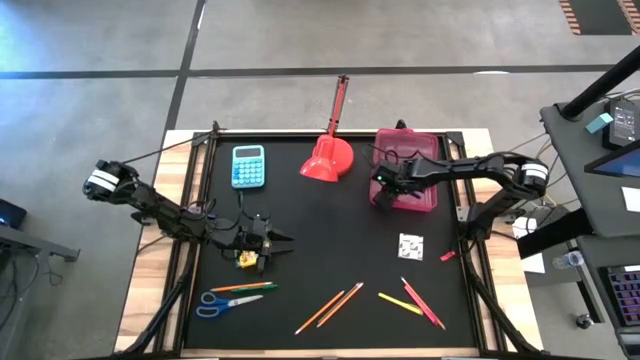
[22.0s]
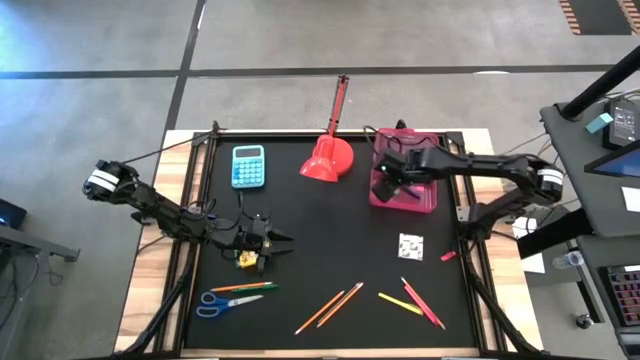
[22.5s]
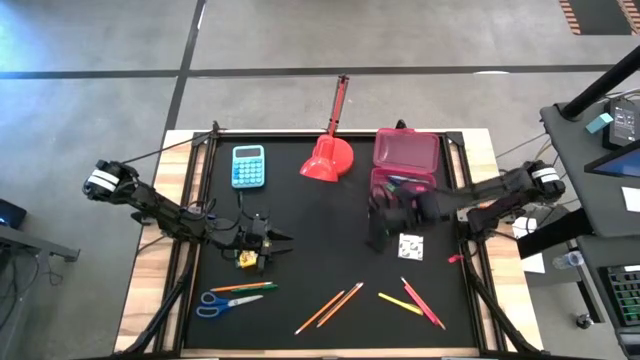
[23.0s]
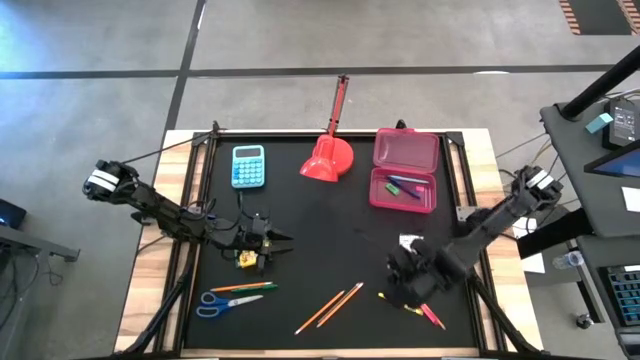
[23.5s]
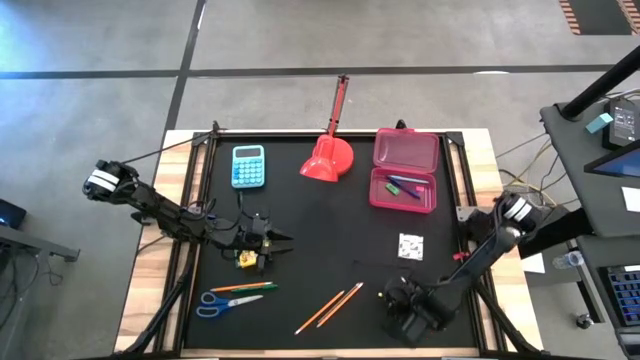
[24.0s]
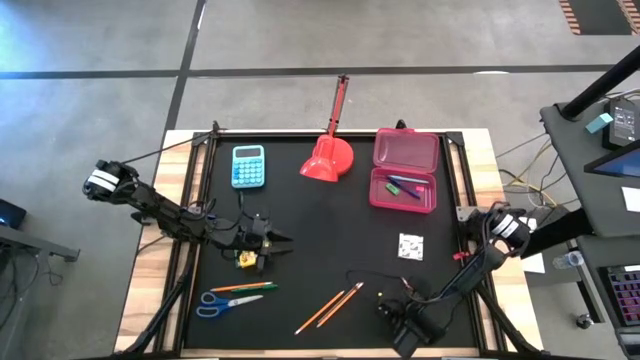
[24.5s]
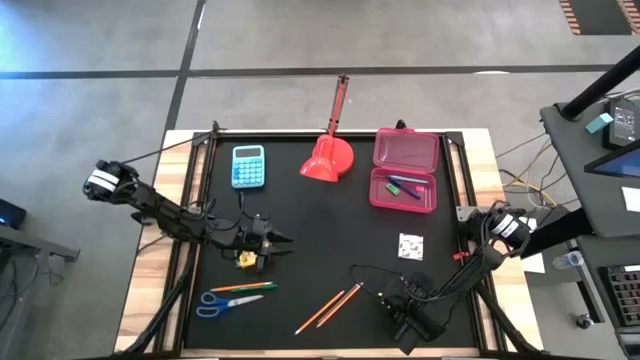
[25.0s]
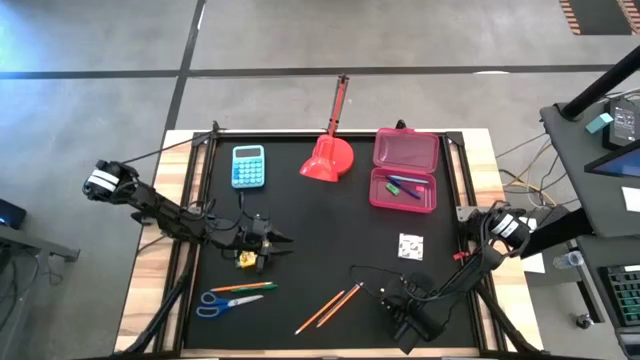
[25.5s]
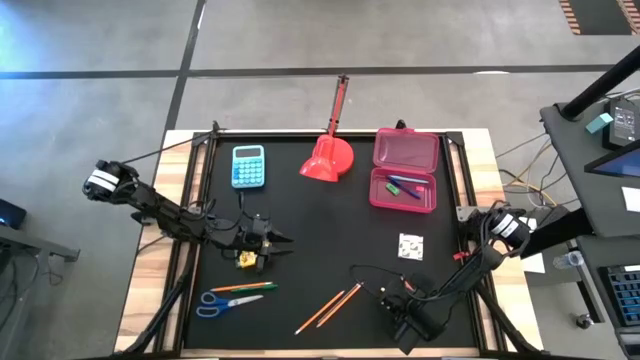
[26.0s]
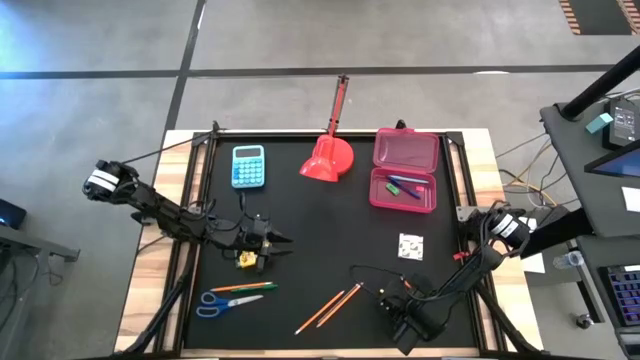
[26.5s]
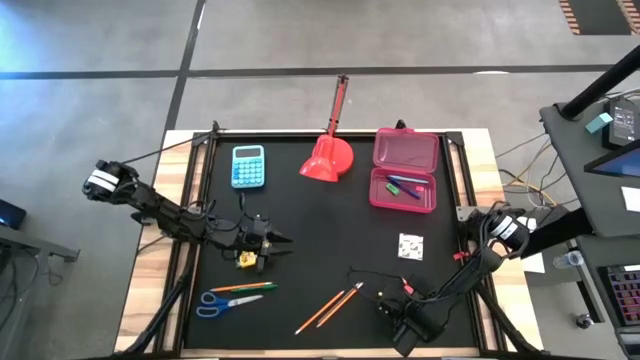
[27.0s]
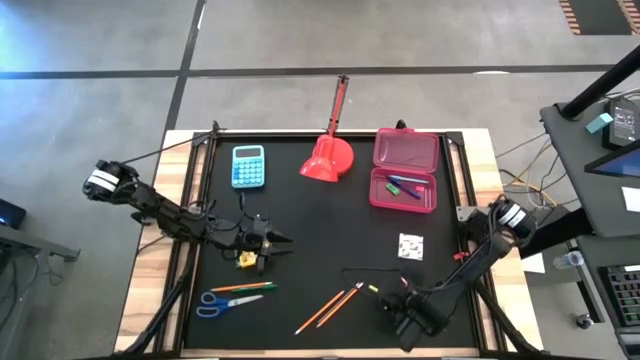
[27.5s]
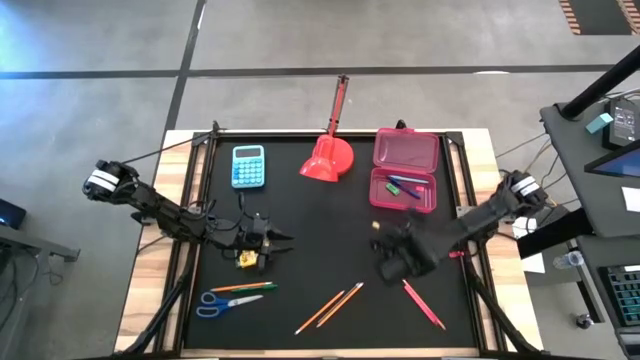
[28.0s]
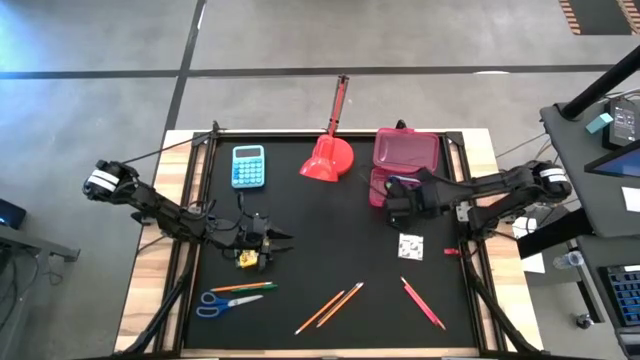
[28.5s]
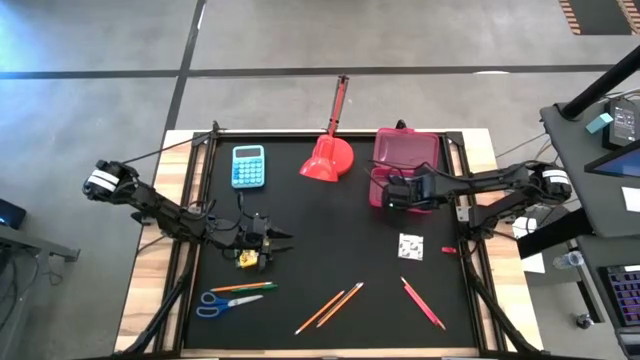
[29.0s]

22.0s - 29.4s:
Task: Pack school essentials
Put the yellow pen into the pink supply box

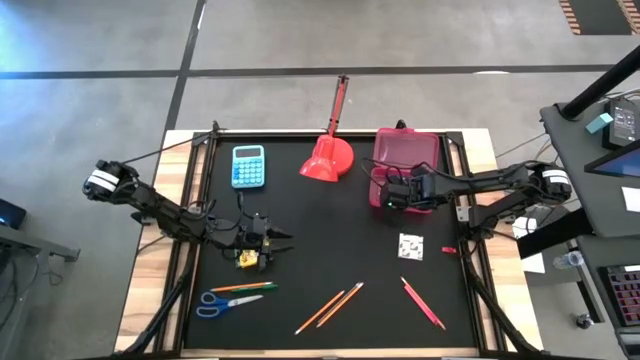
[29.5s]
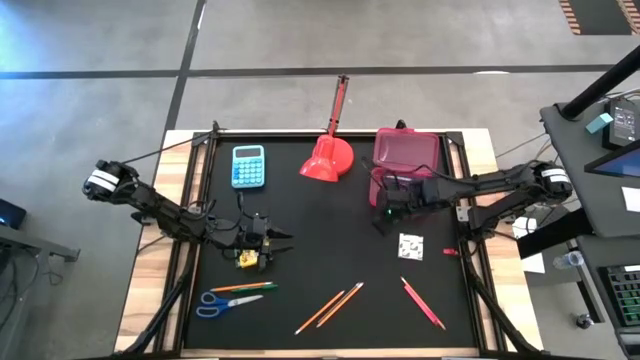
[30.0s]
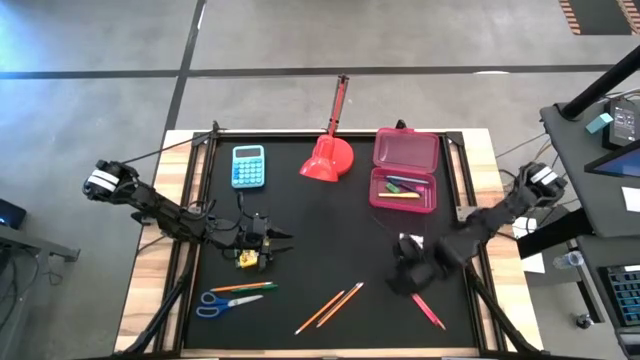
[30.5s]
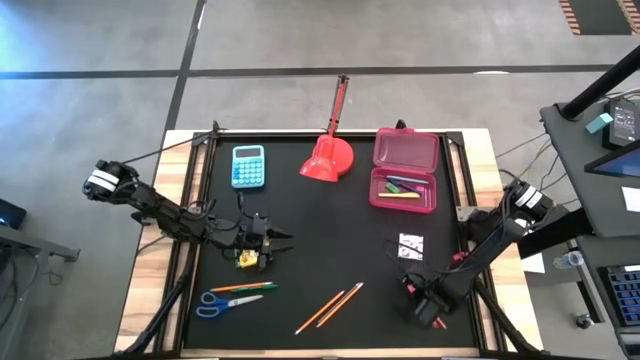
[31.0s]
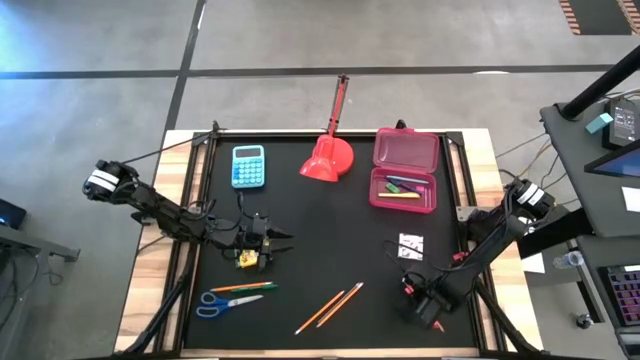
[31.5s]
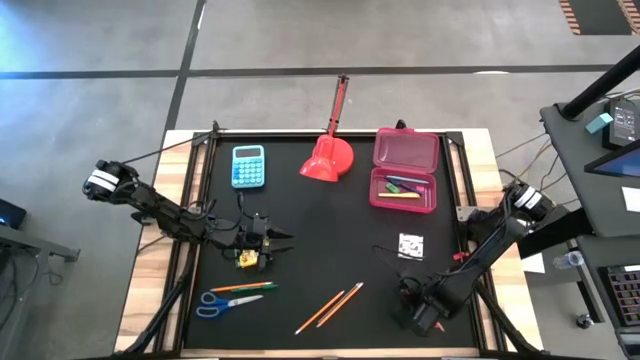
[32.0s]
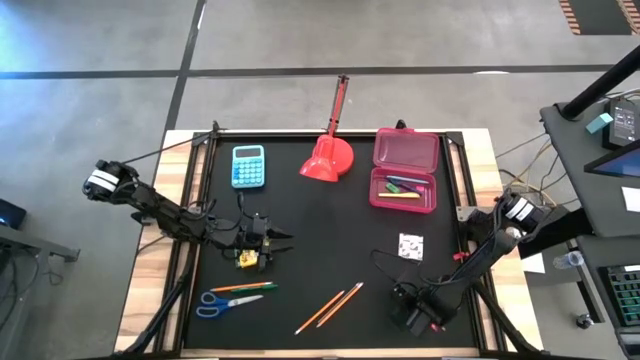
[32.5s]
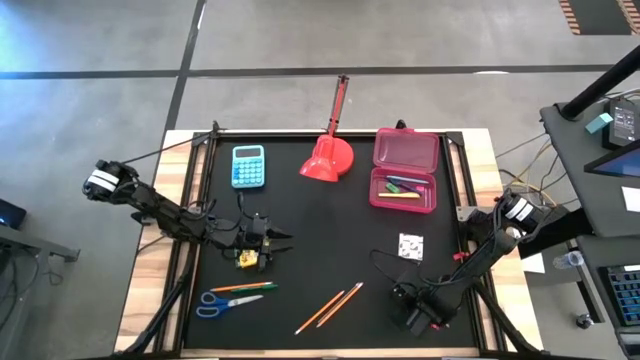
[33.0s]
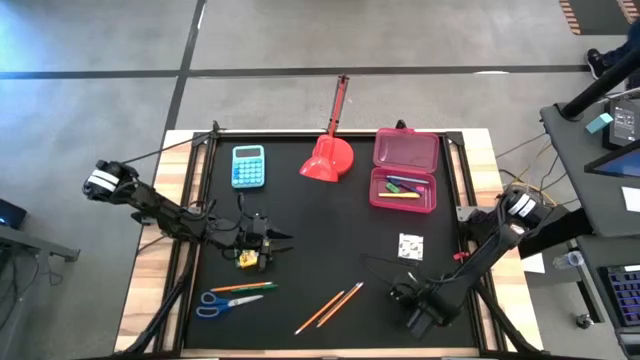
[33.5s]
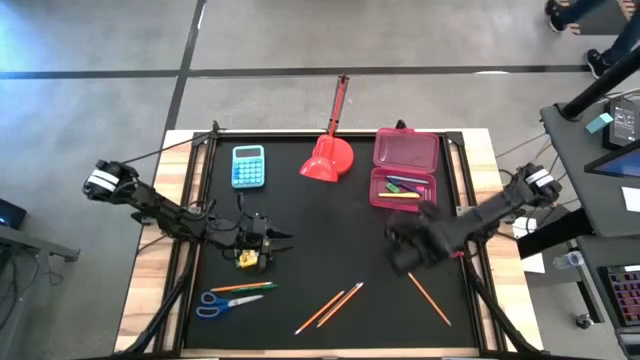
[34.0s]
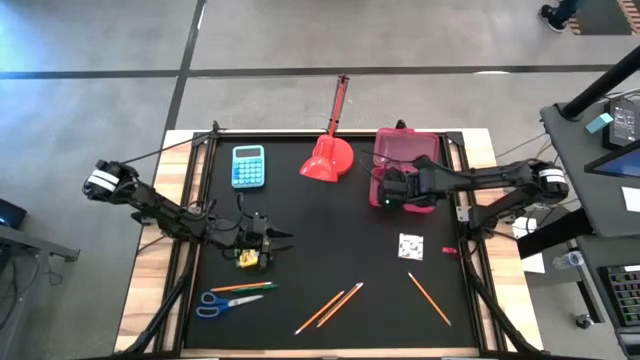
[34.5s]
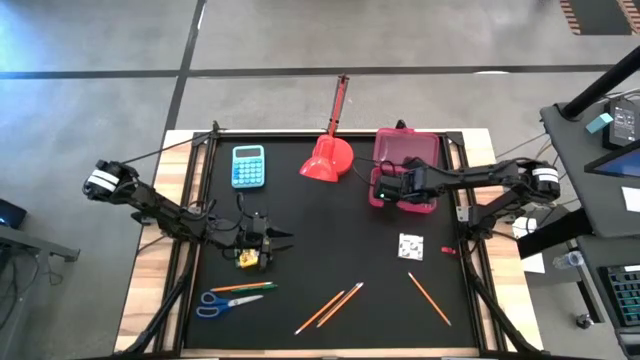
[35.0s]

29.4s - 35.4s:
Put the pink pen into the pink supply box

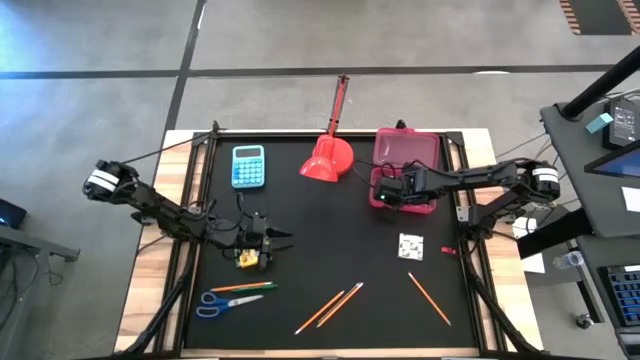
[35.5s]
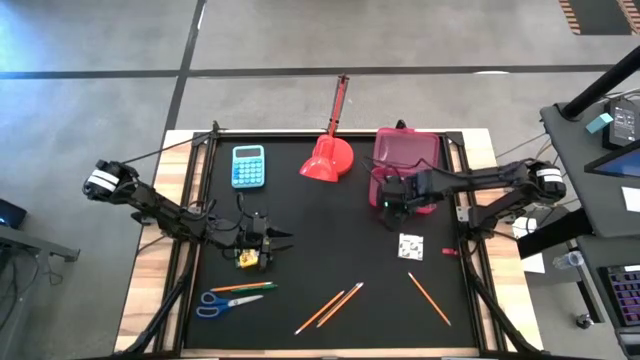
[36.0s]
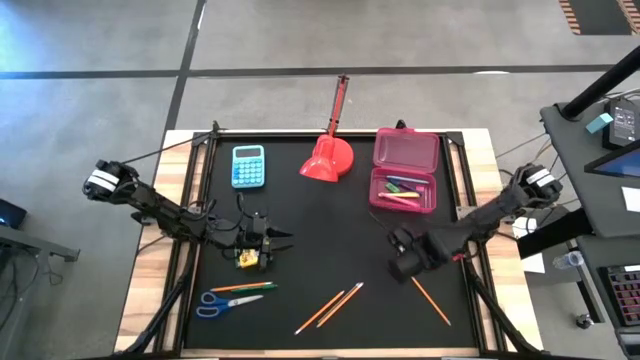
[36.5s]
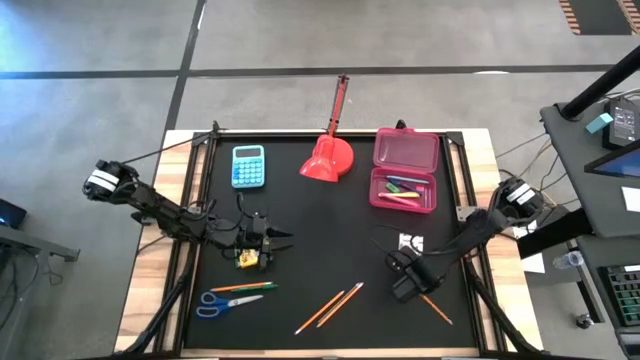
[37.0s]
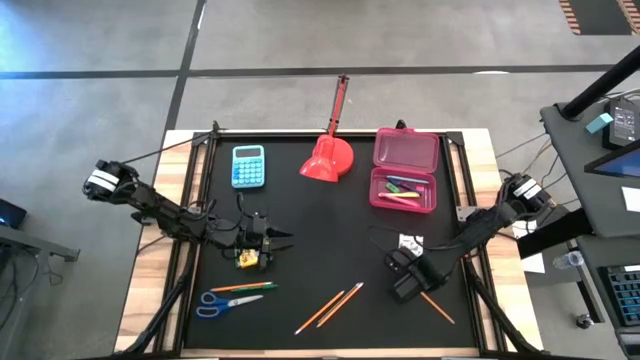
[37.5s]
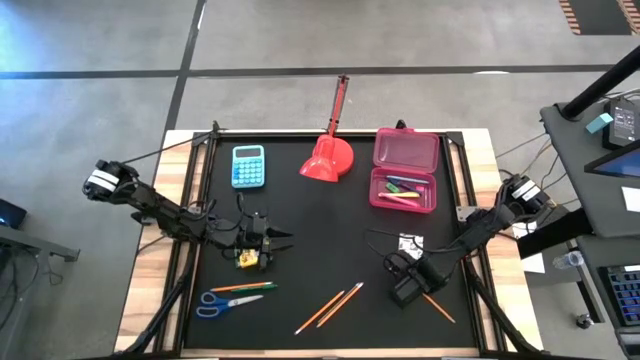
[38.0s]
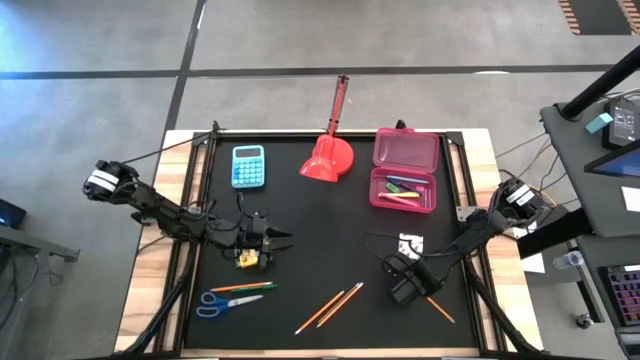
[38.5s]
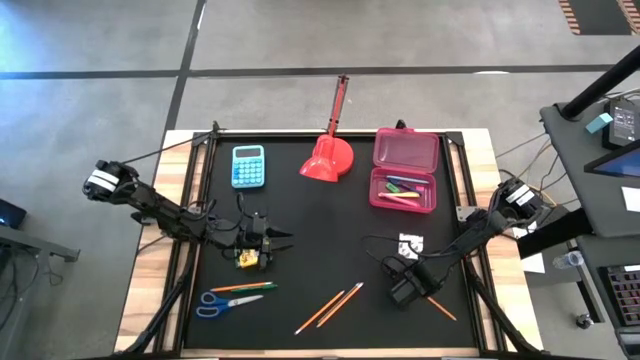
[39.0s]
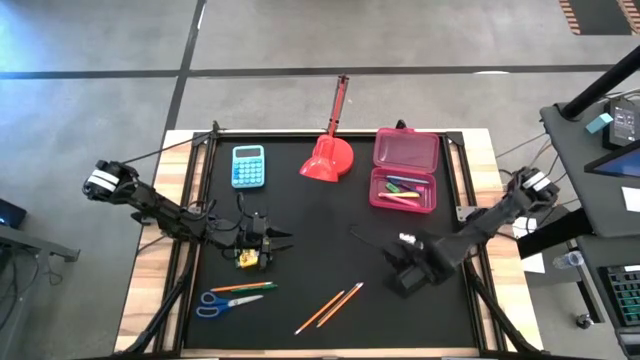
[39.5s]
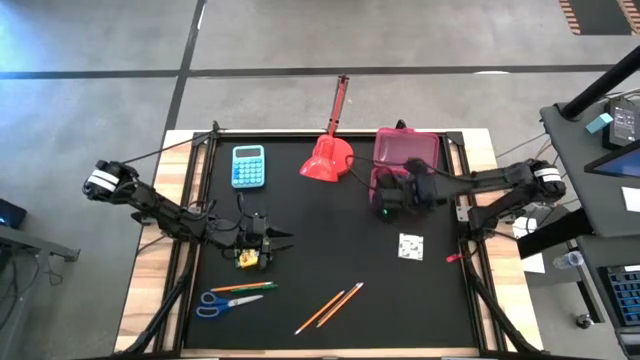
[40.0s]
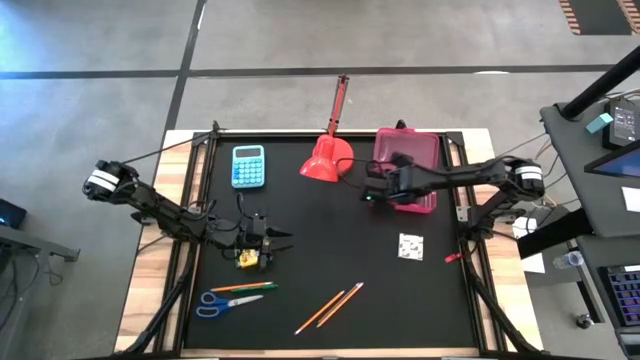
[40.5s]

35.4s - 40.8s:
Put the orange pencil into the pink supply box

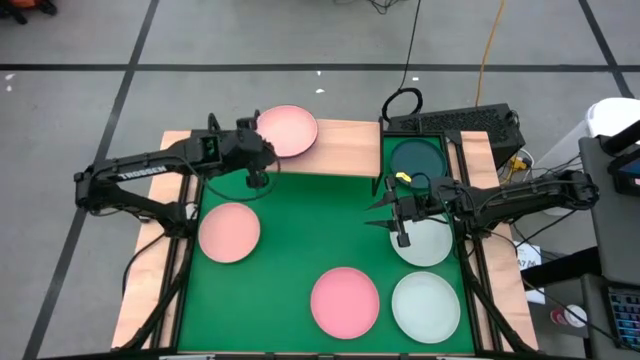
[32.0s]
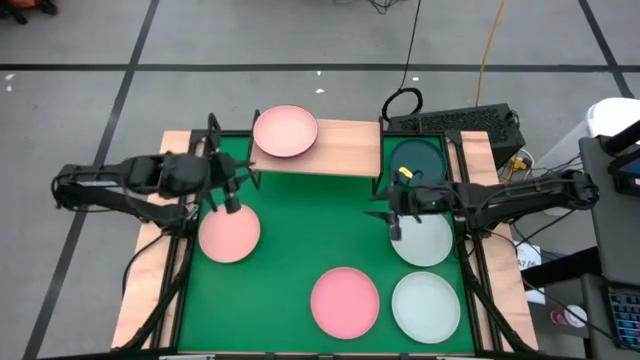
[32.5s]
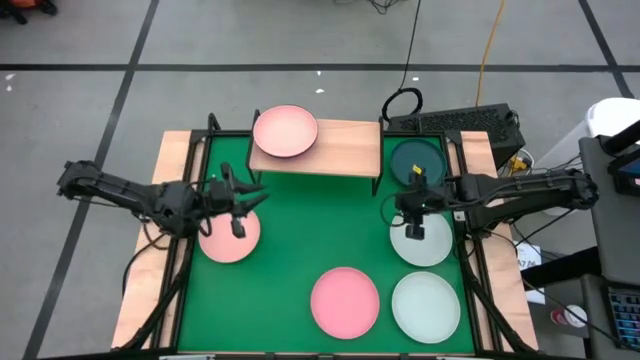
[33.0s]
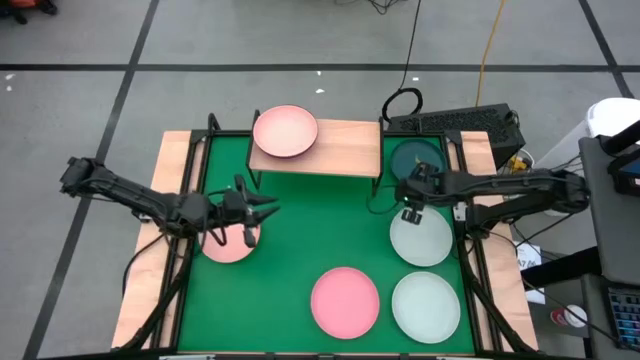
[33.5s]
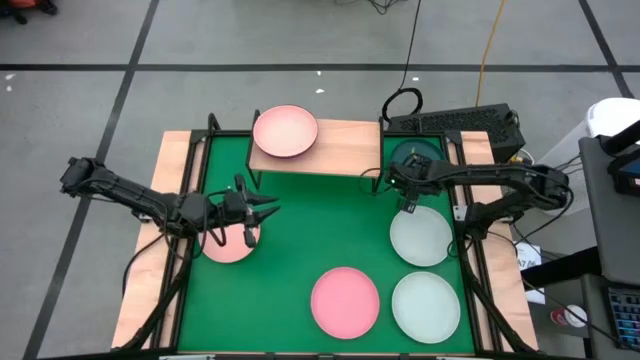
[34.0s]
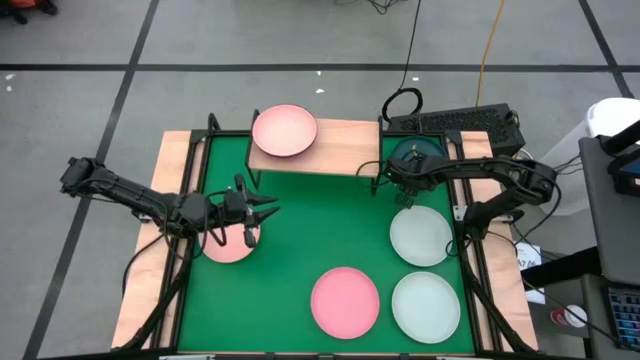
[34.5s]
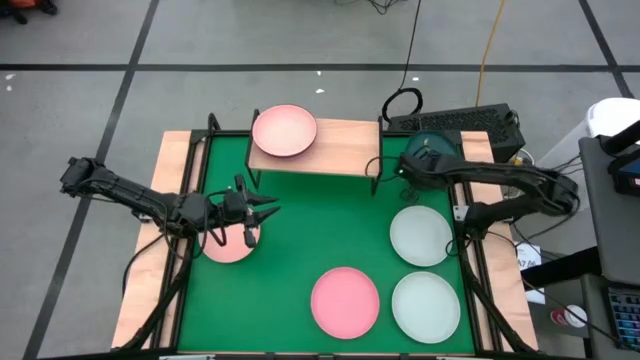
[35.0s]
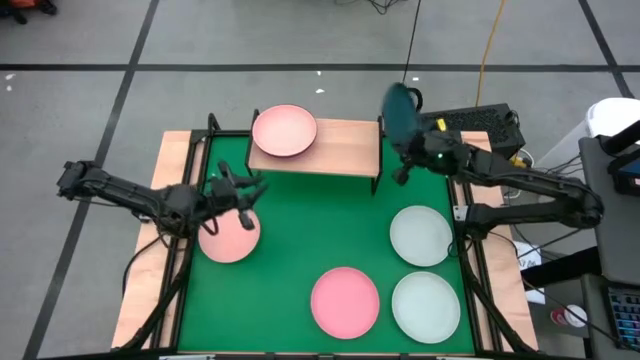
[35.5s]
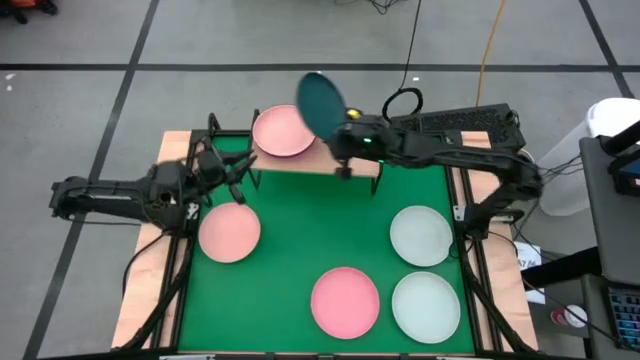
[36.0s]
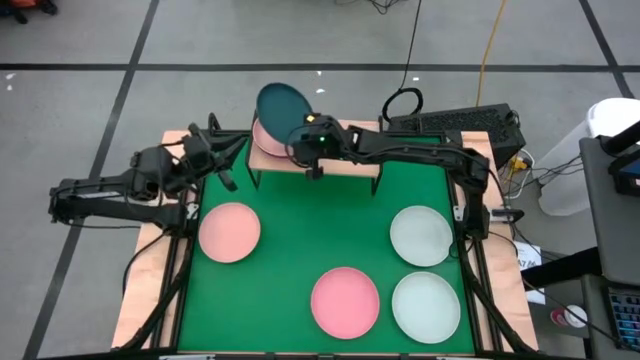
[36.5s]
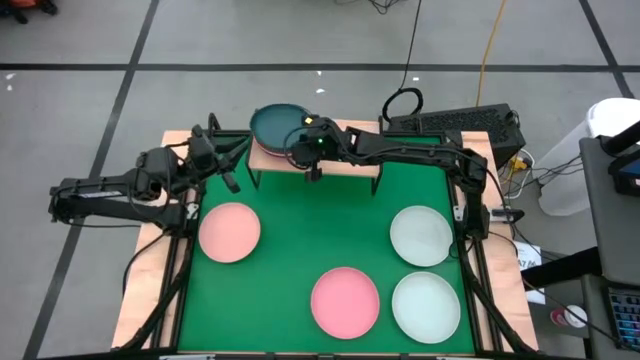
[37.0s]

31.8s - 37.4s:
Task: Place and stack plates onto a shelf
Stack the green plate on top of the light pink plate on the shelf
